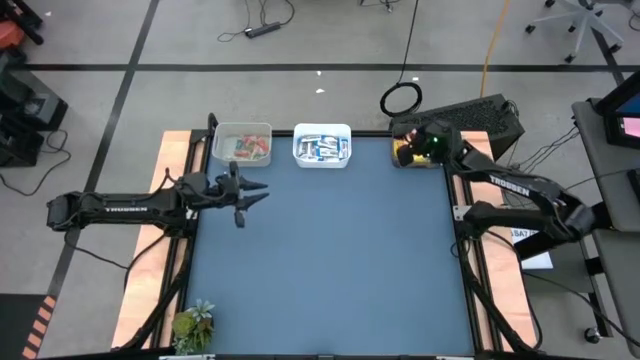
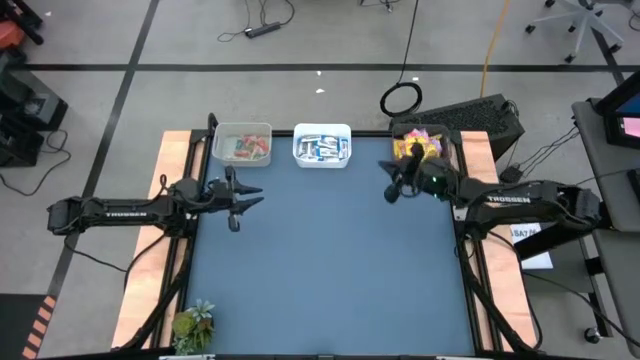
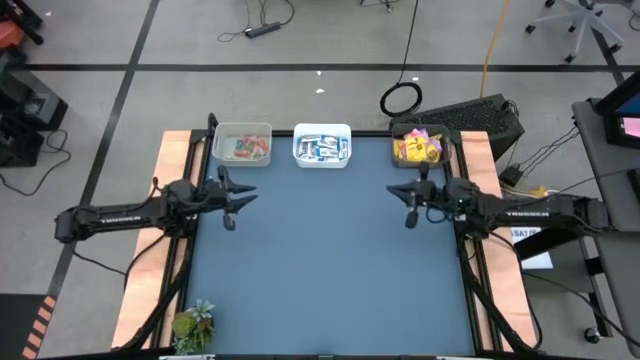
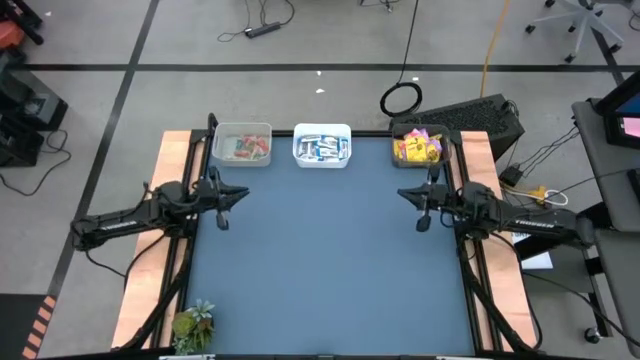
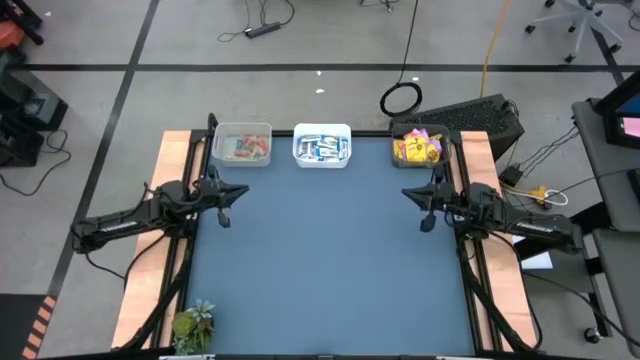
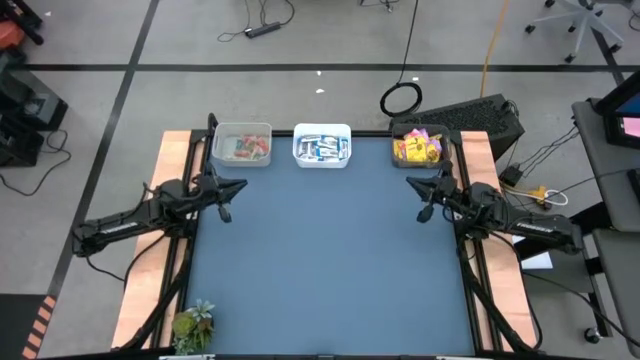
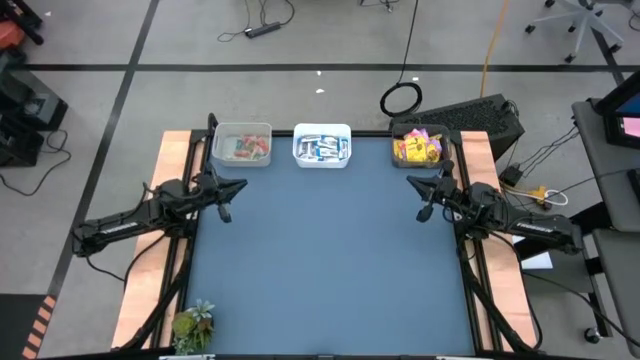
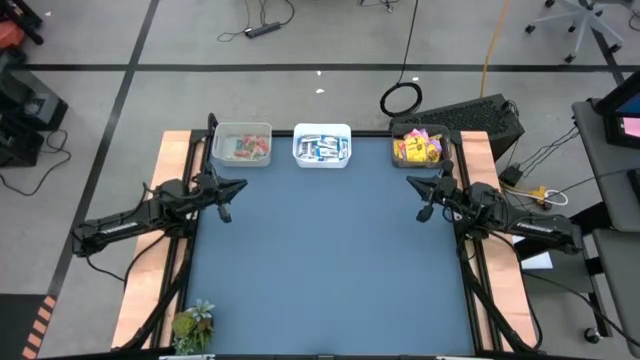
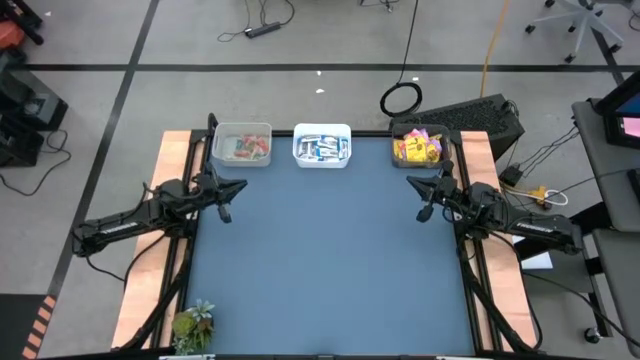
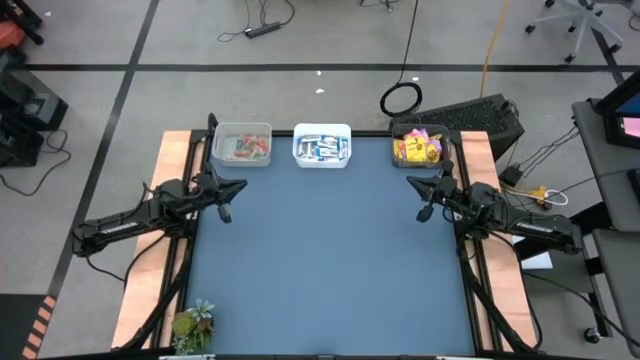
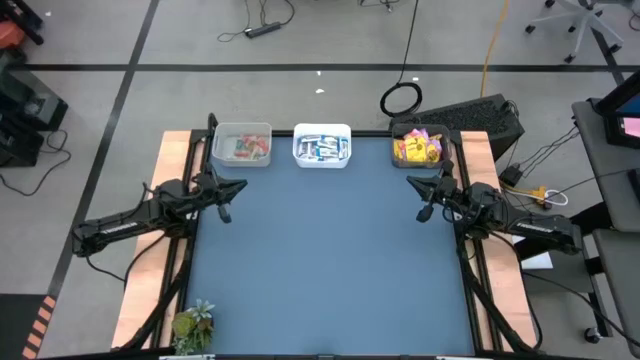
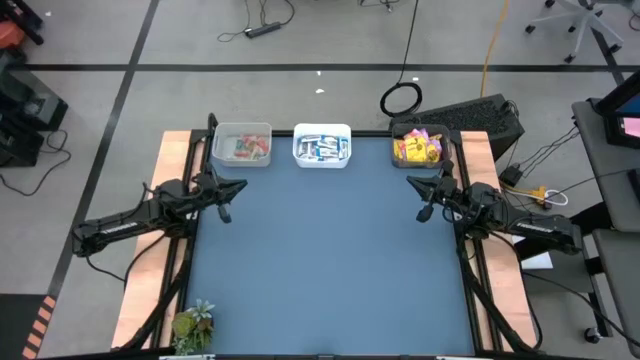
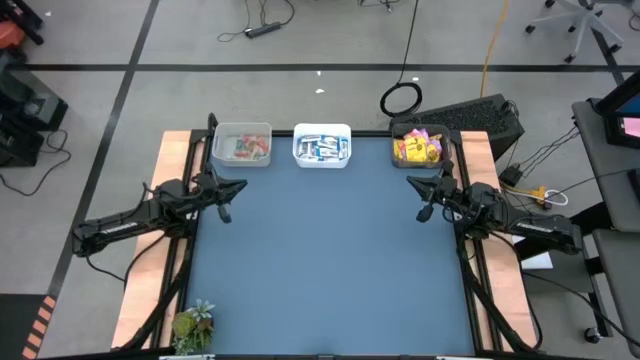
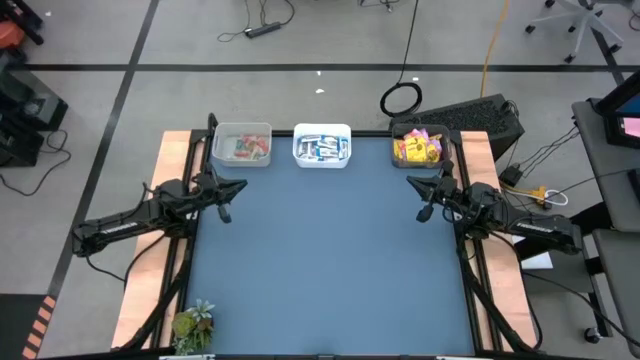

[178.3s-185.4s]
Task: Sort candy
Return to Home Position

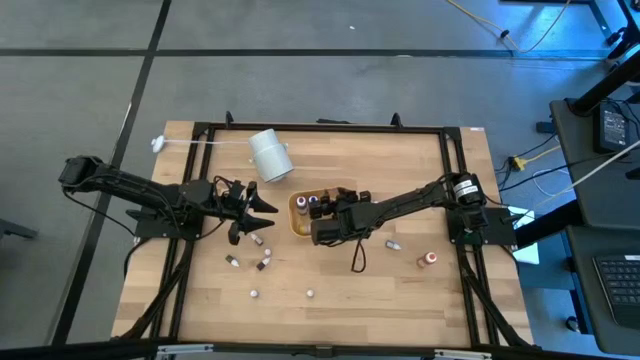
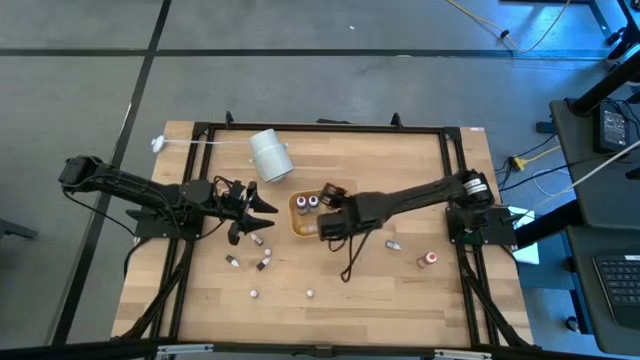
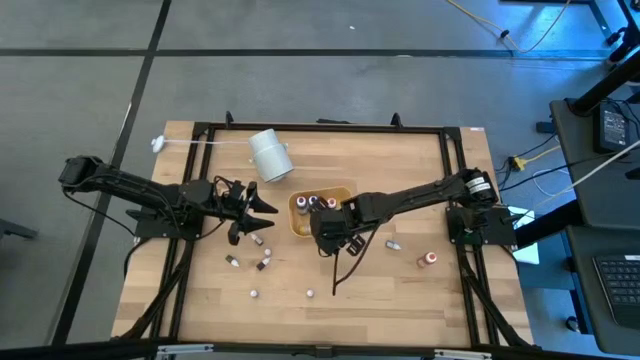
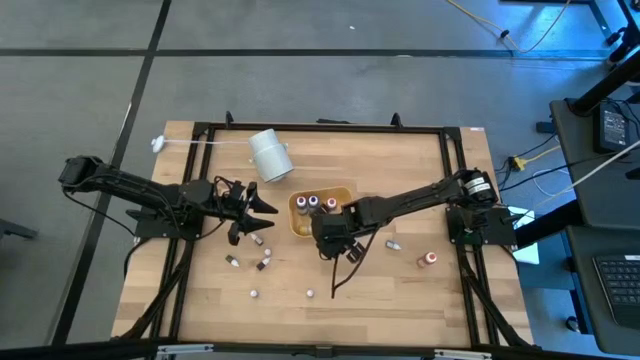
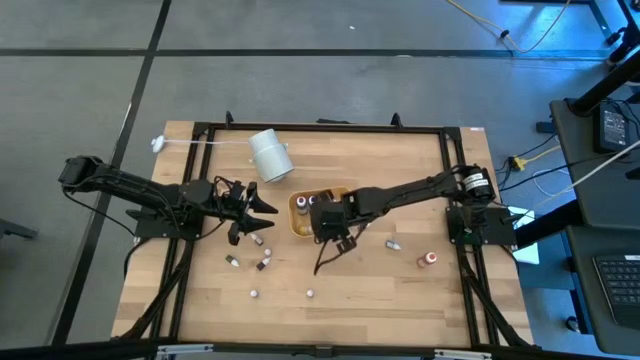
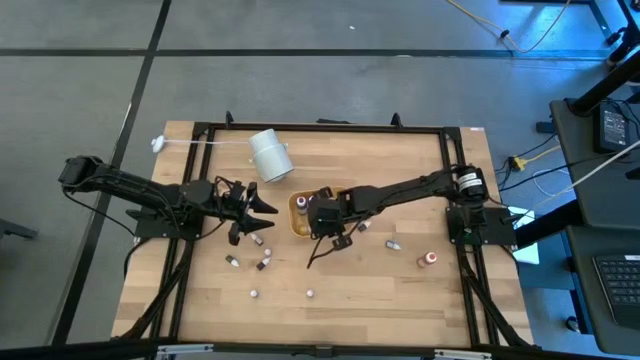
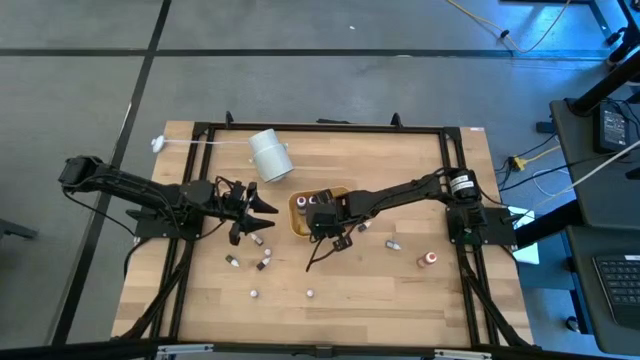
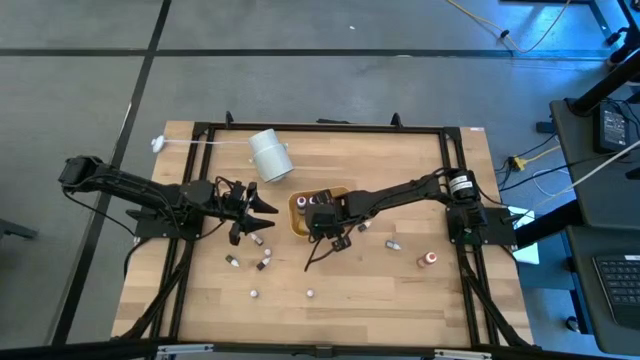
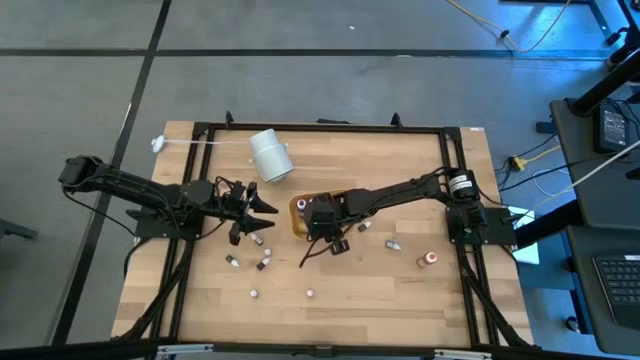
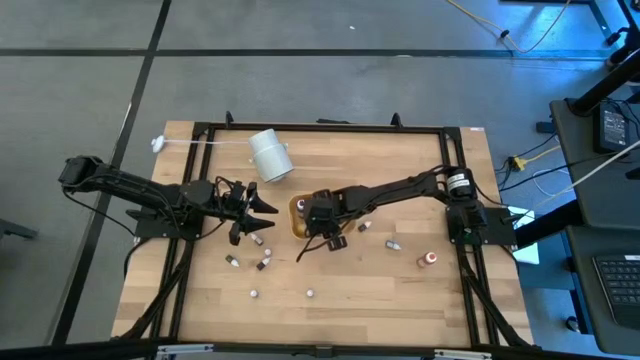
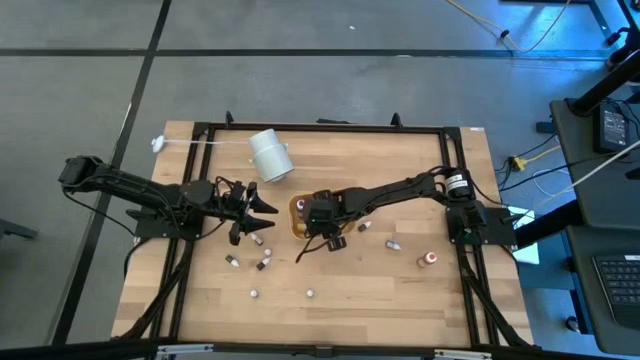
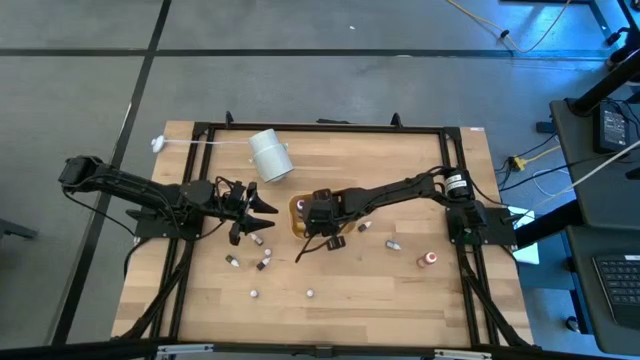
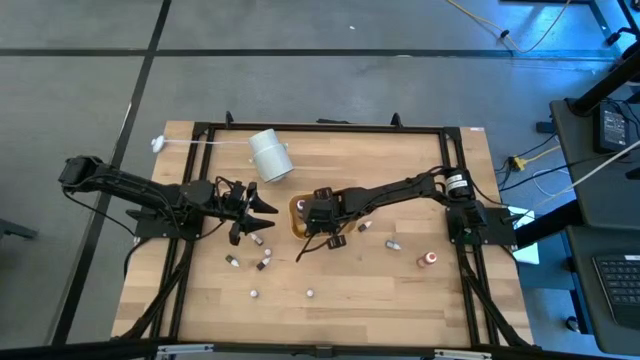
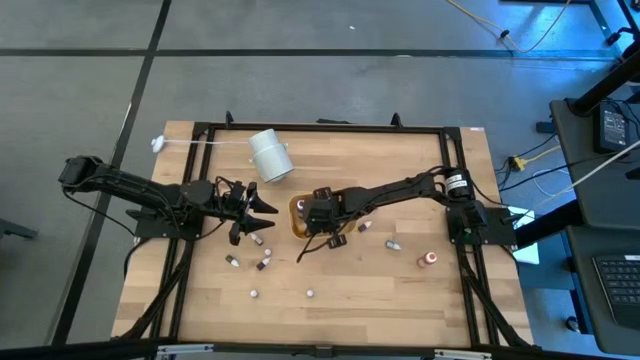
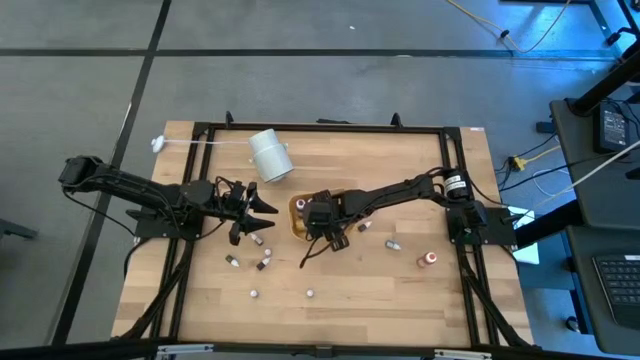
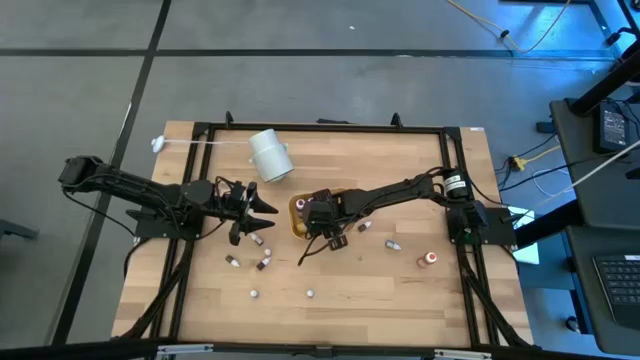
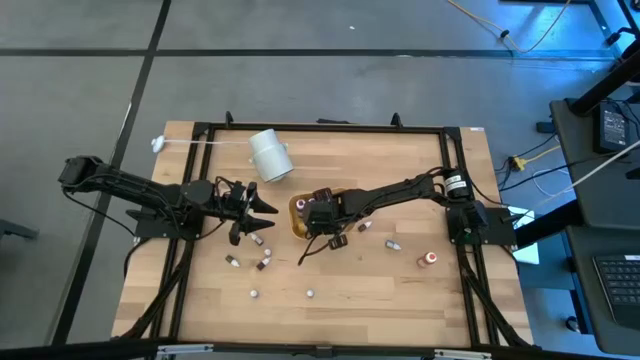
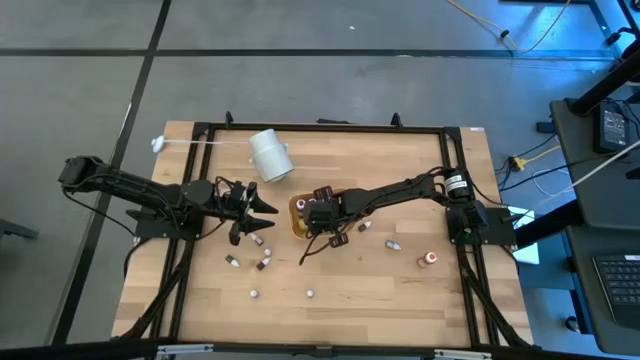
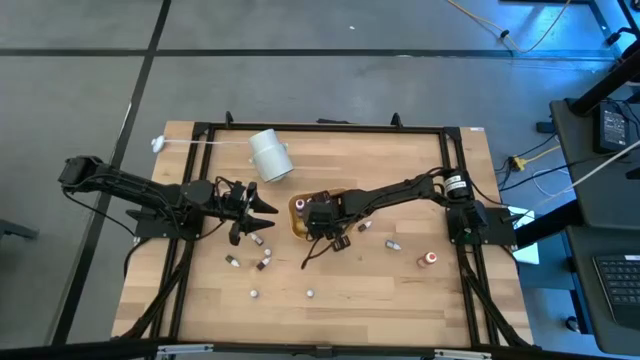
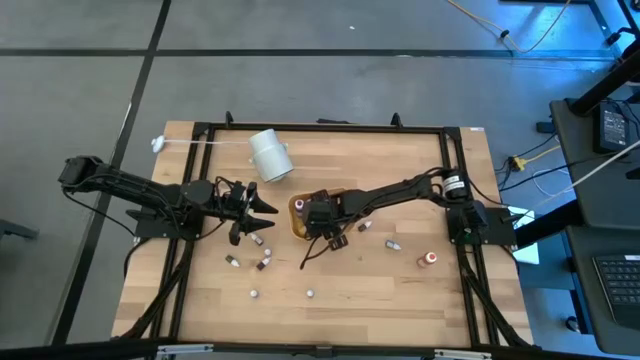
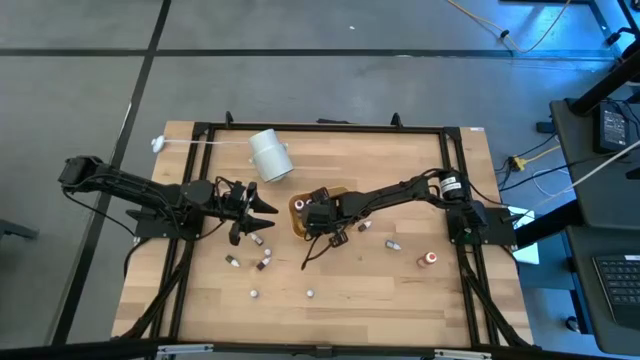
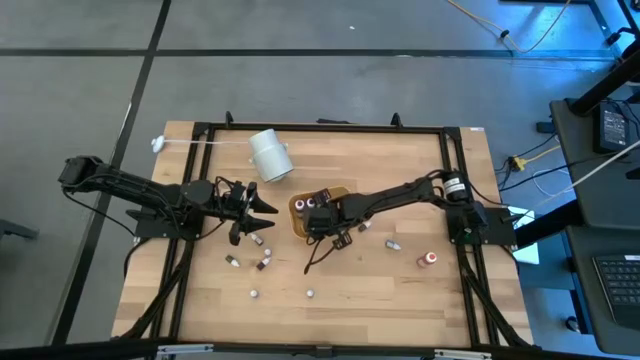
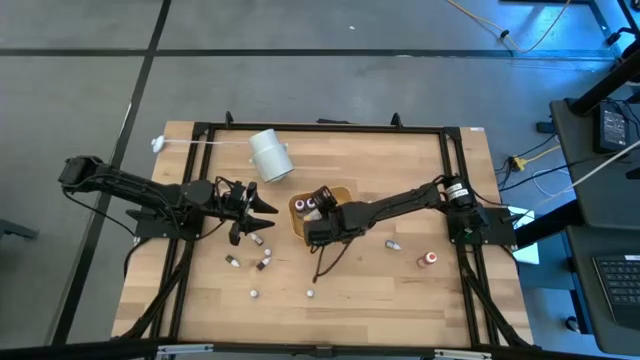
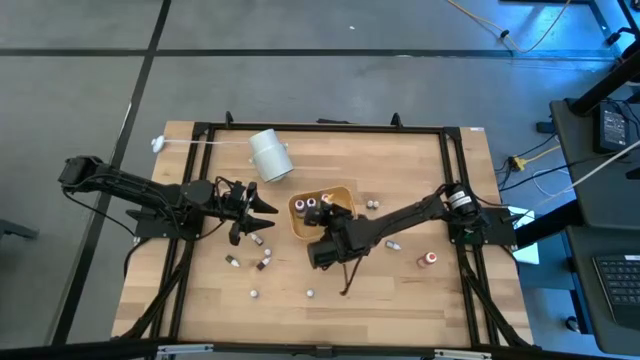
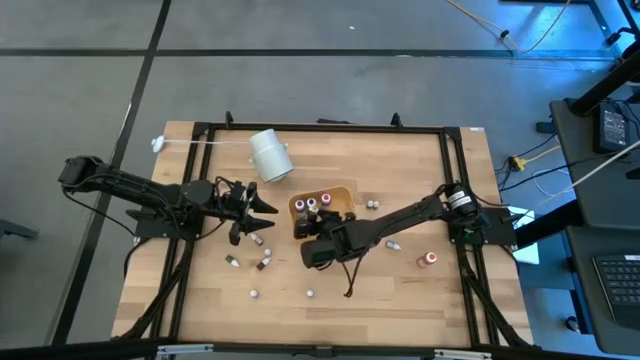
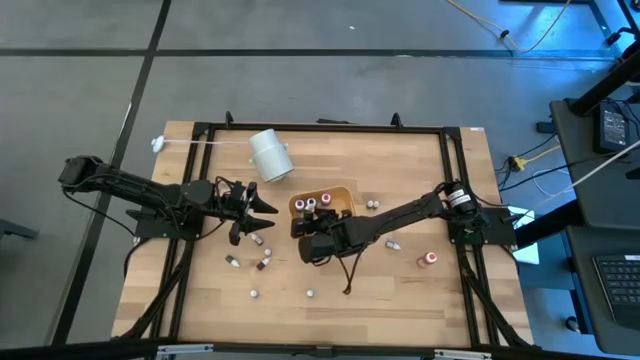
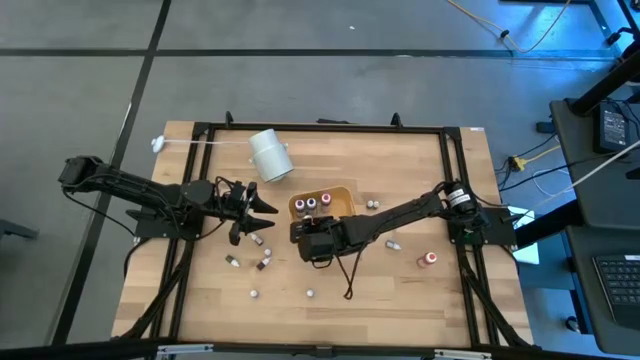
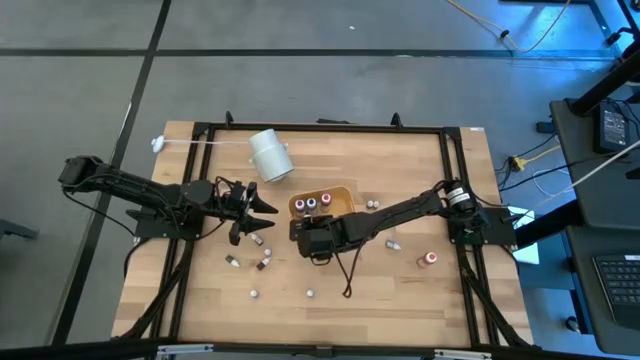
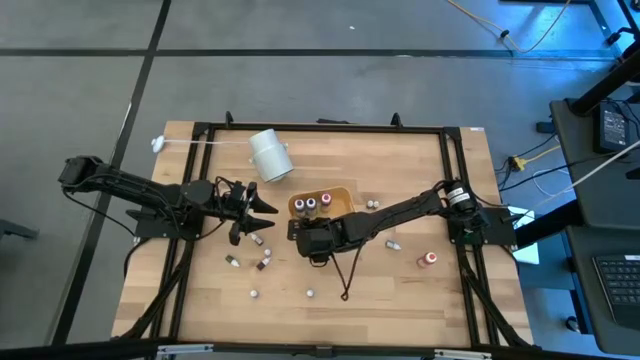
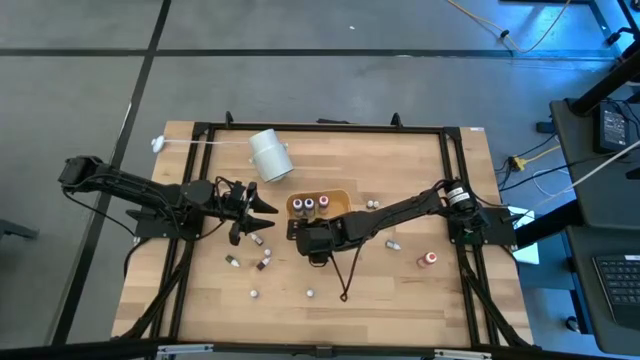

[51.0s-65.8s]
Task: Pick & Place food coloring
Adjust the yellow ink bottle in the yellow bin
